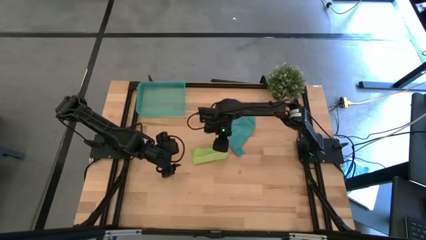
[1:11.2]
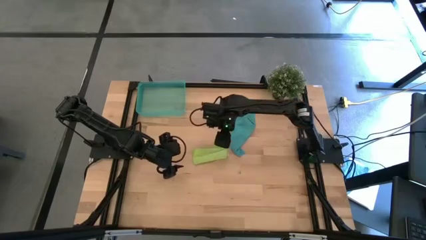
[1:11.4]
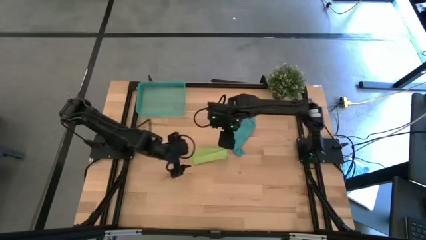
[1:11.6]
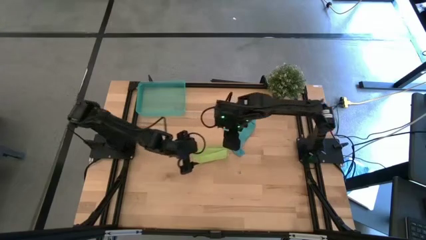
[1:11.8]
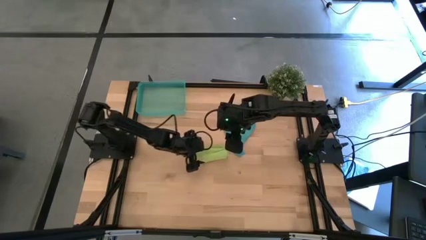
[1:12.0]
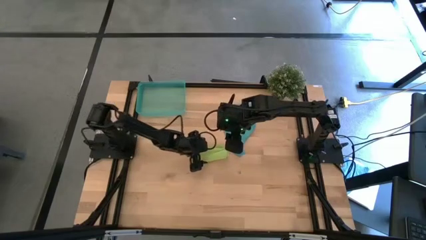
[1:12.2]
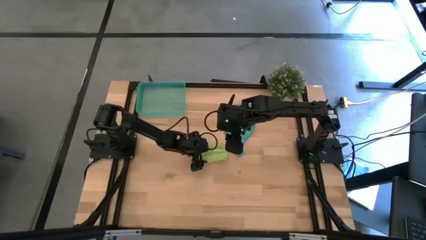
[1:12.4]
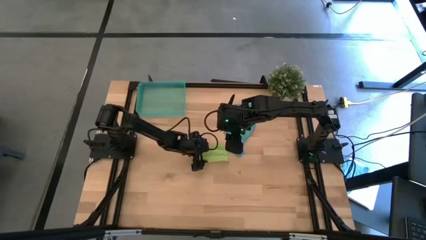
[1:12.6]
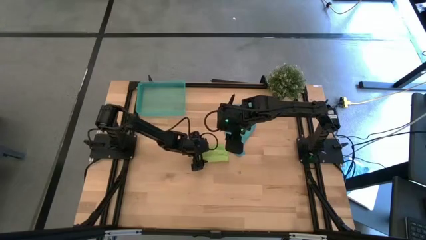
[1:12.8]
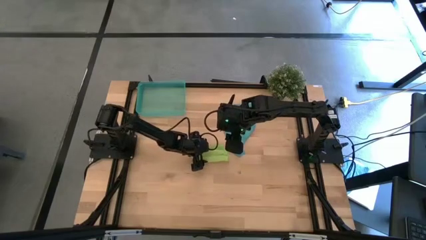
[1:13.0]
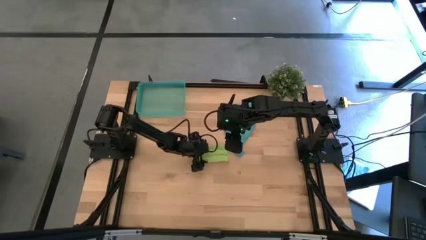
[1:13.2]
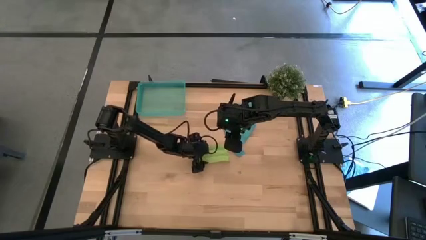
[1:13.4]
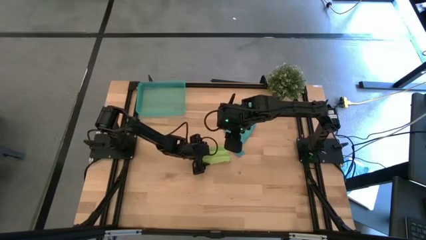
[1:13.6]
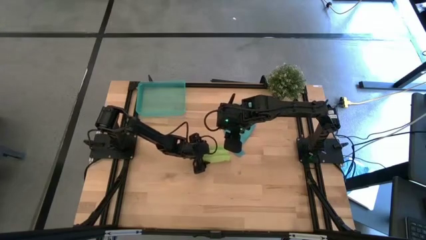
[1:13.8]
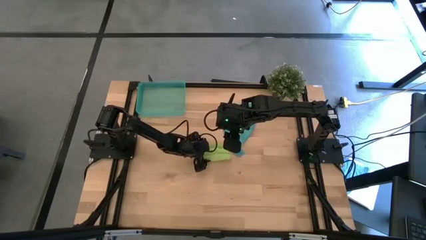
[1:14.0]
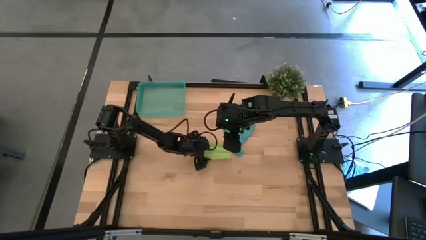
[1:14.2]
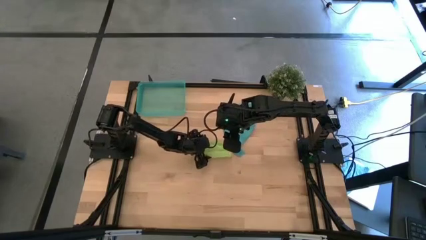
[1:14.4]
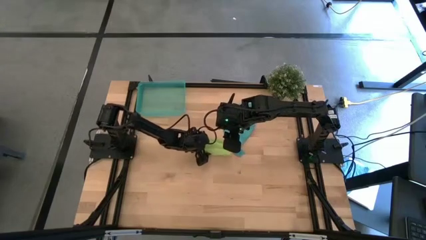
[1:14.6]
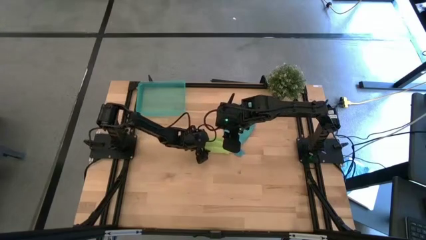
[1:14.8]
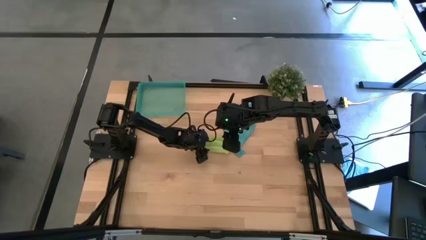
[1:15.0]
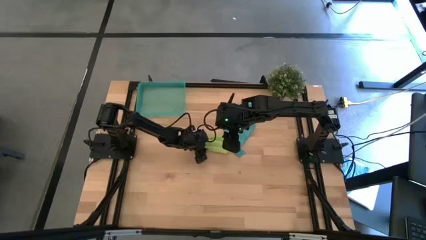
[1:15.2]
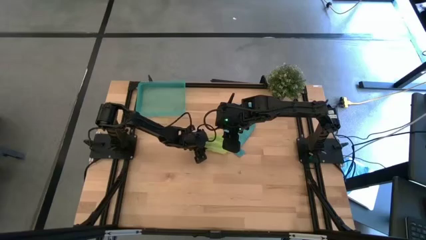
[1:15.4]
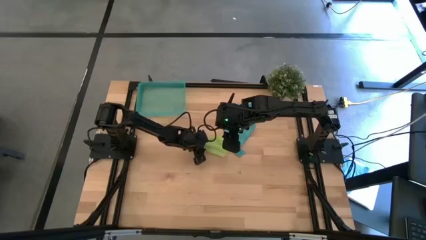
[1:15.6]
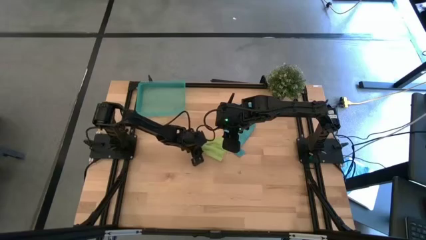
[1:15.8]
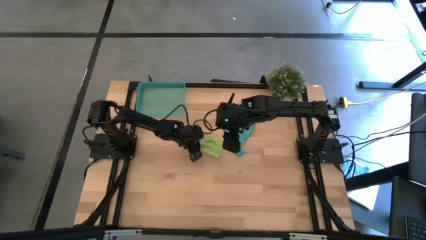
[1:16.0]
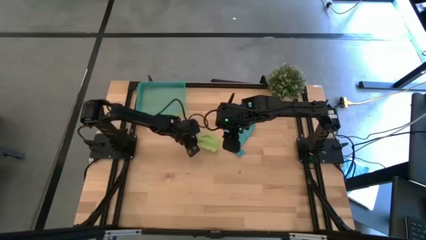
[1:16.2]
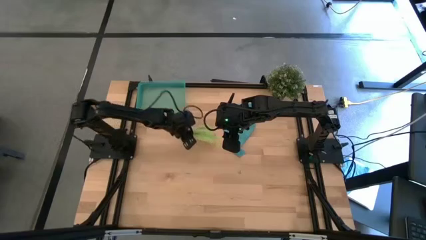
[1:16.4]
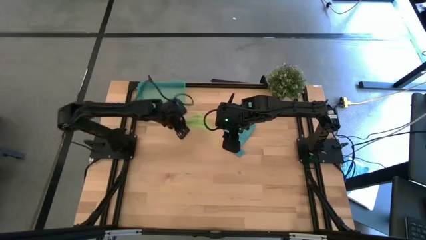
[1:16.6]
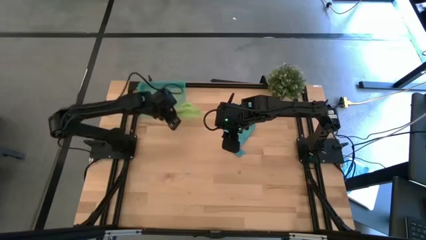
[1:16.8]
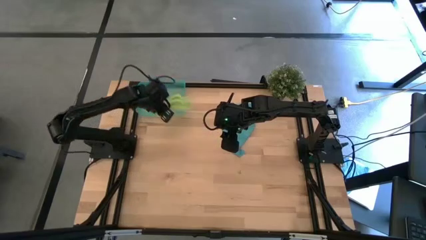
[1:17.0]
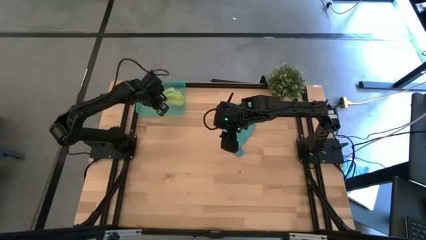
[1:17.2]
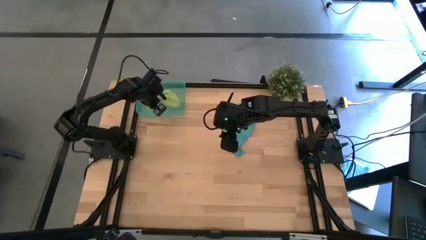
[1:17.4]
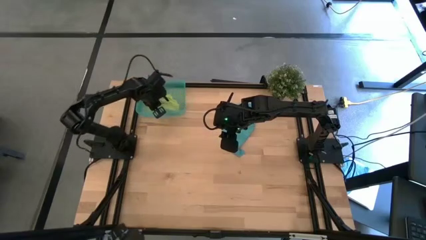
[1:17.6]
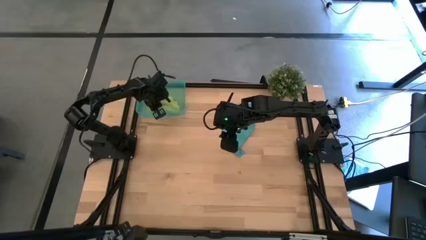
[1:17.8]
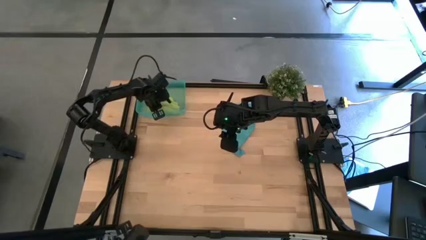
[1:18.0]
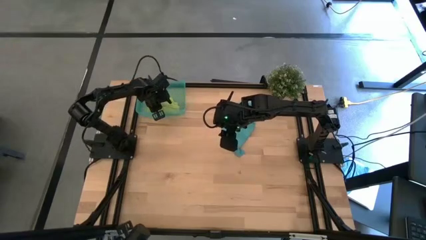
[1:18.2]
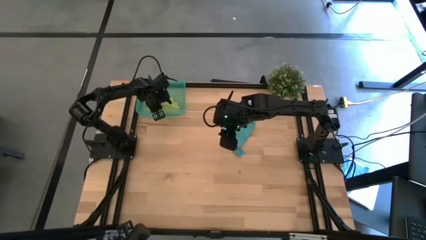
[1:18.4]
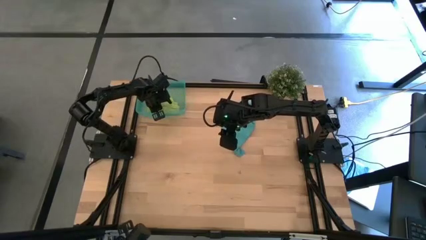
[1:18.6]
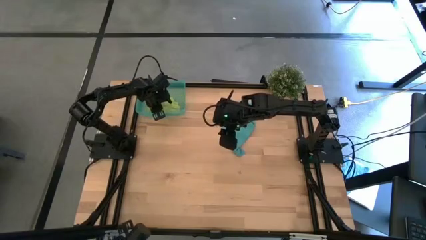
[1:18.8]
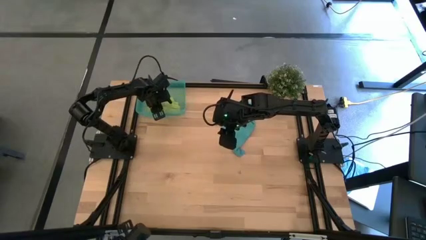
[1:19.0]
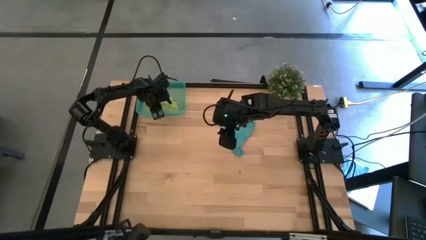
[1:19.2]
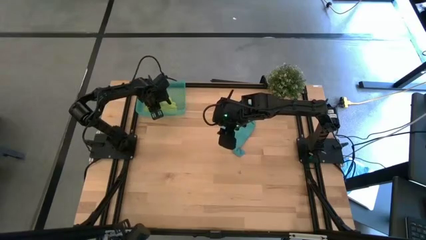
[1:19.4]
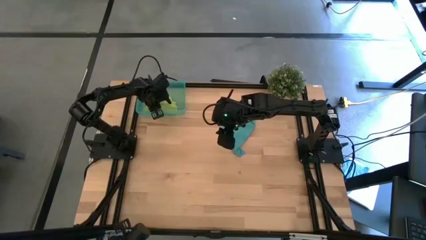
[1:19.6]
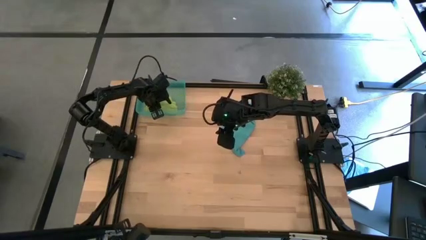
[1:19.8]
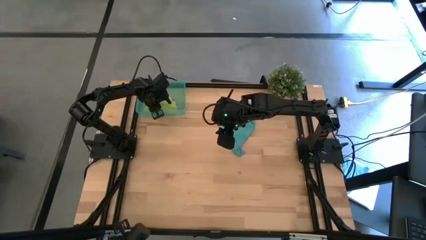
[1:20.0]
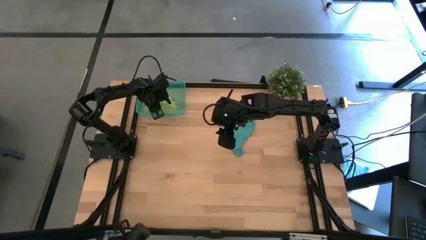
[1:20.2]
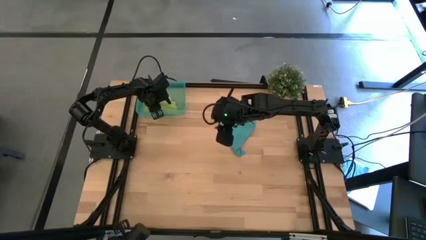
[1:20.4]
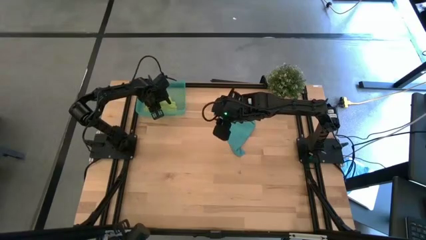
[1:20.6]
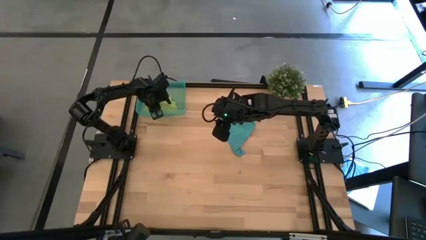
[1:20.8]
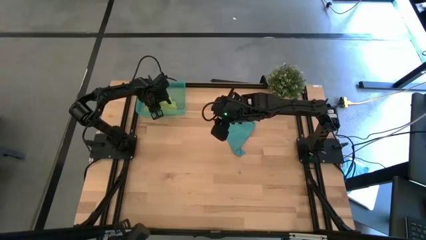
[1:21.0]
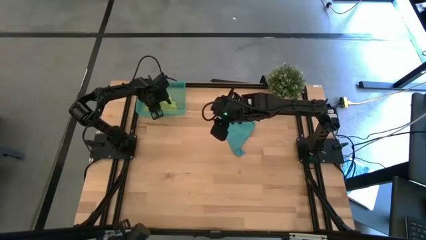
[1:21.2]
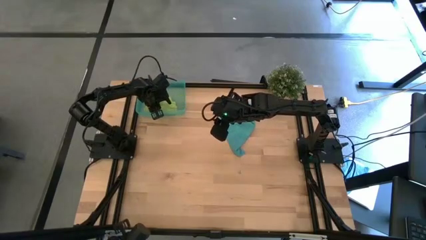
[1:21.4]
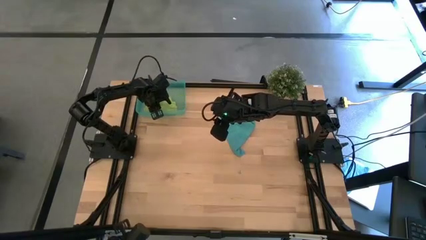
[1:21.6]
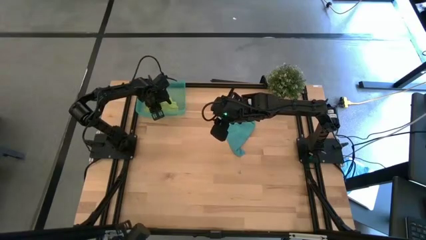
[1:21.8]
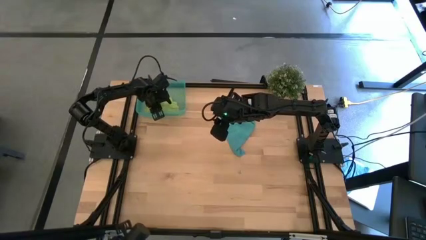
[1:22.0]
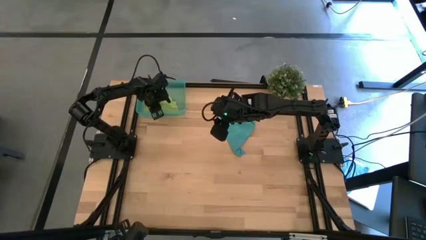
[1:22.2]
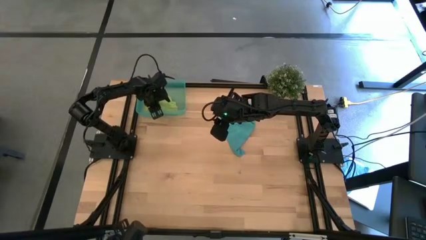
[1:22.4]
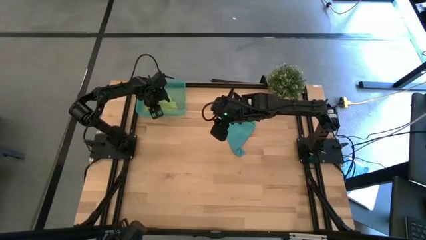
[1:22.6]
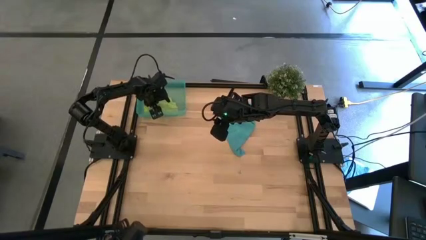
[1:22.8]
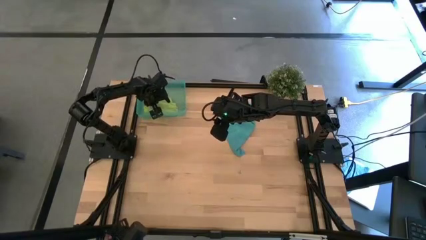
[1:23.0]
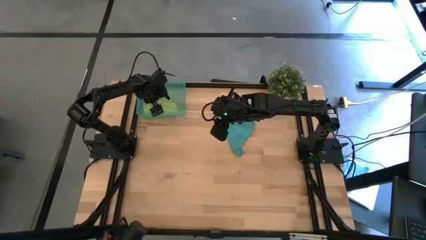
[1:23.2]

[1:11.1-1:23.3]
Task: Roll microfiber towels into tight, uniform cylinder then place into a basket
Put the green microfiber cloth into the blue bin

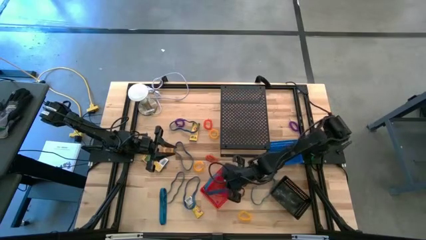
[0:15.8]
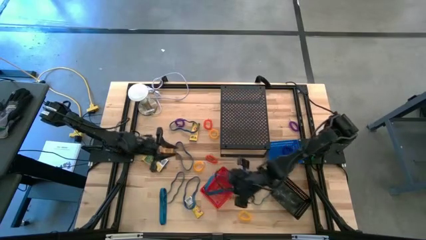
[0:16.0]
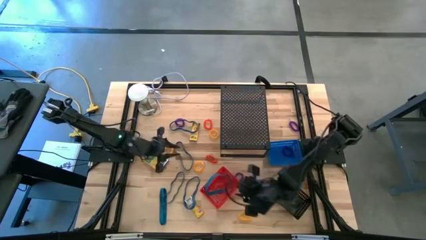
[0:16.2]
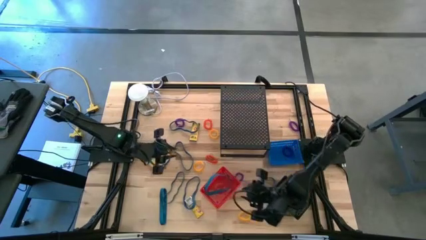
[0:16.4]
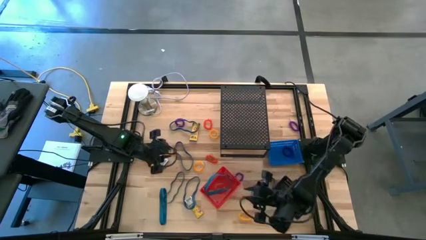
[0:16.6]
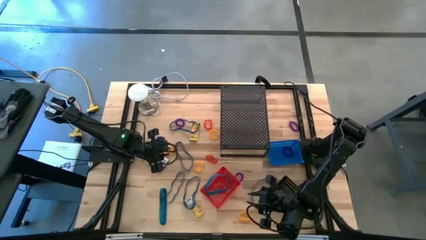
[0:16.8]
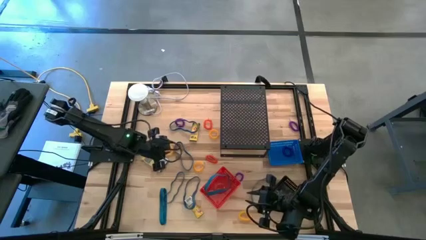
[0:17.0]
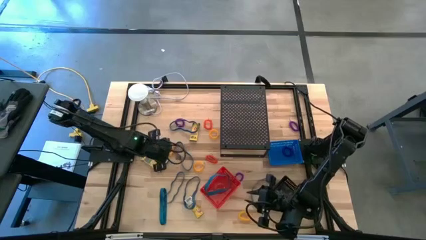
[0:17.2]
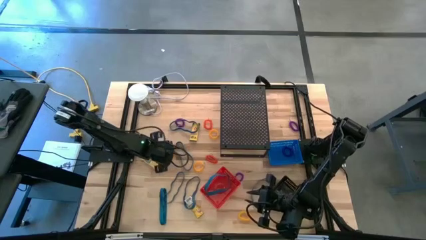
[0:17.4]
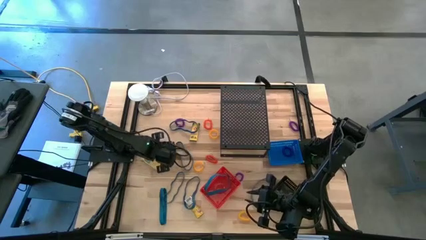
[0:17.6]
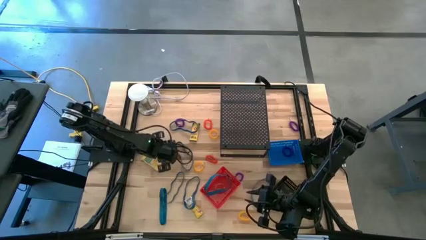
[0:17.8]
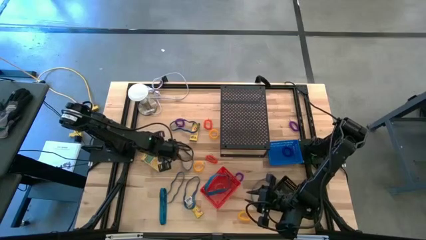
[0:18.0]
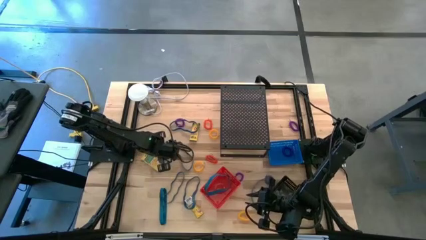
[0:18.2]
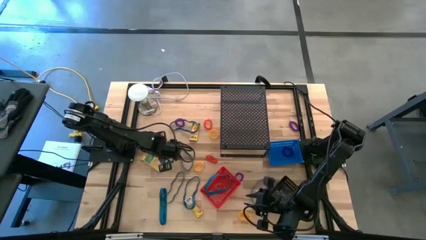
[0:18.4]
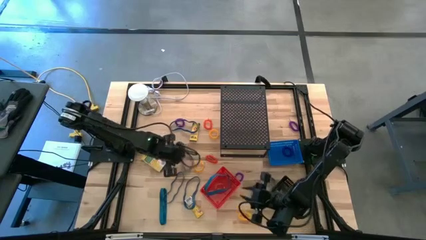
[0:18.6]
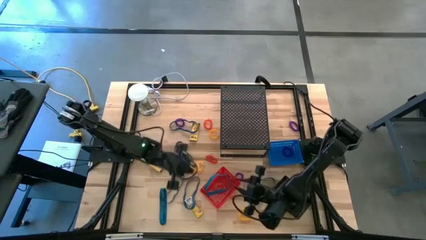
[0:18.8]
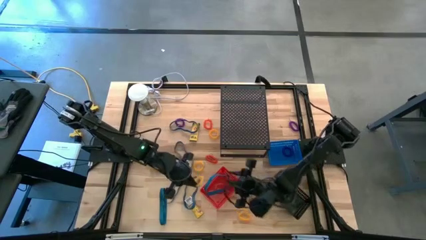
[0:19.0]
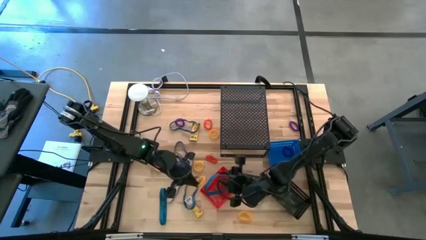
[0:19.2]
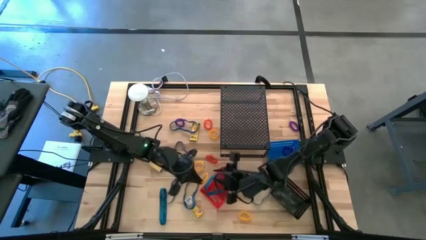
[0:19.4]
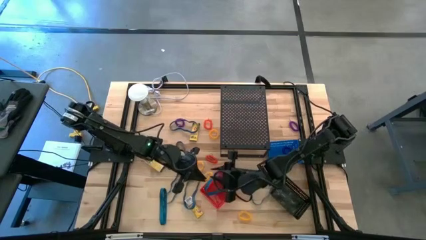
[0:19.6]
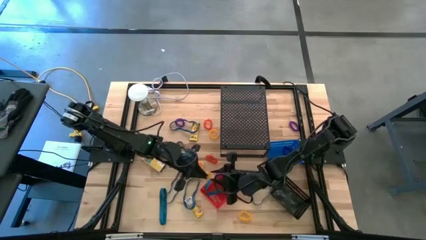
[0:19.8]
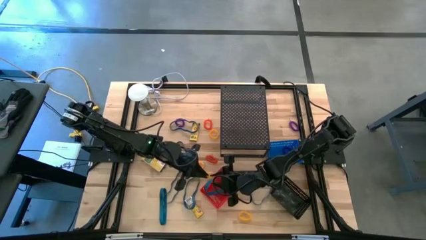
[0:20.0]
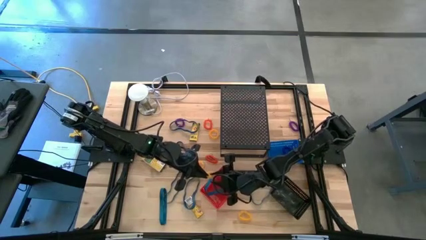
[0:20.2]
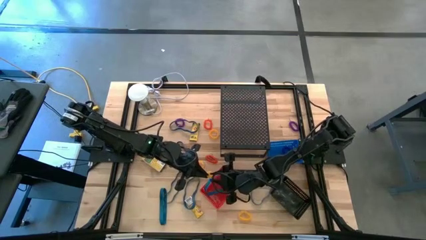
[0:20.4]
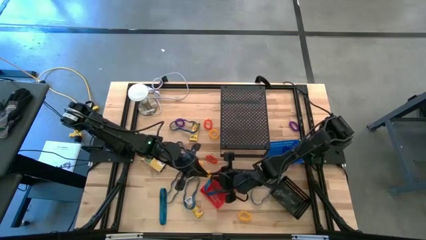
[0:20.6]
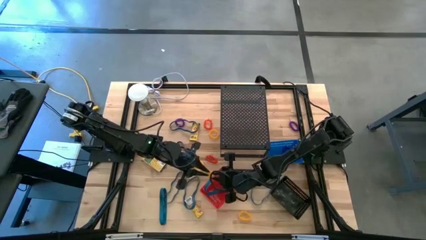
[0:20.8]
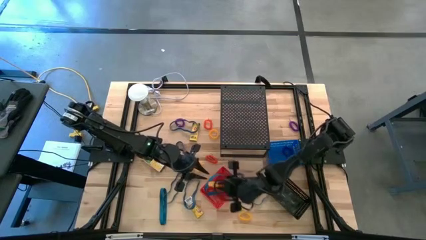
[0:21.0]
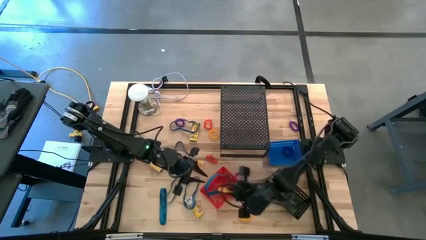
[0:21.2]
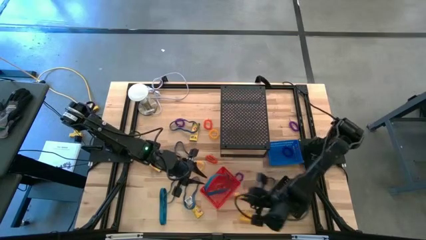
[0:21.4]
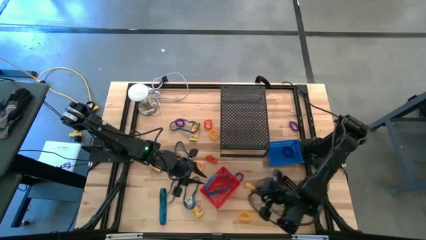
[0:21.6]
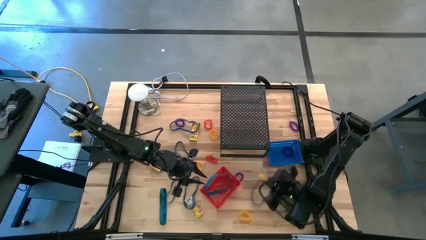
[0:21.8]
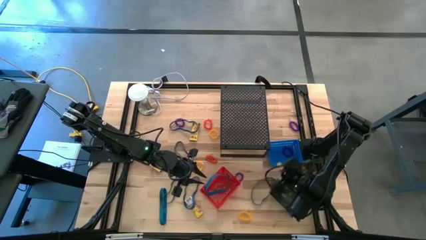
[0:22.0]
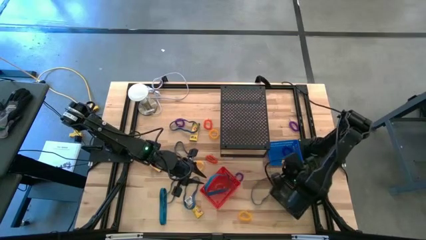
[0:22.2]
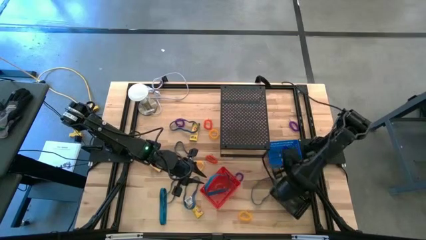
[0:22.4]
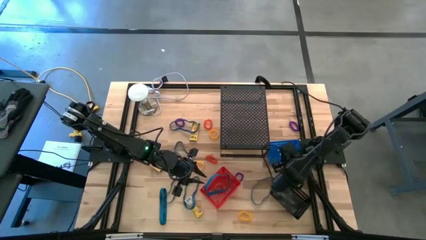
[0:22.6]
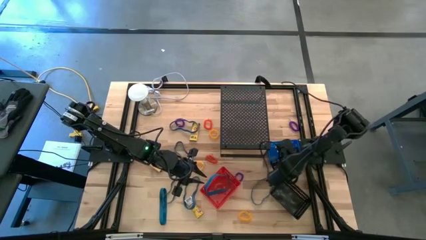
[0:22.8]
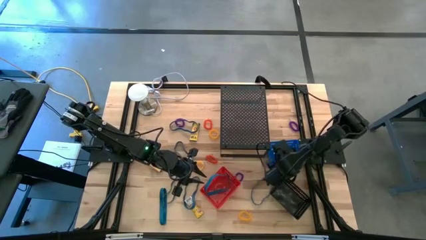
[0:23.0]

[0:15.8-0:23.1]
Task: Pick & Place Office Desk Supplies
Put the yellow spring keychain into the blue basket
